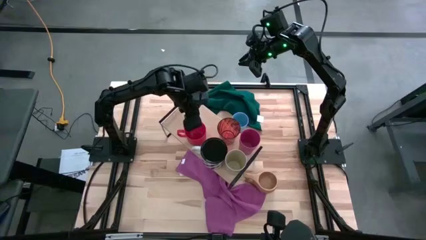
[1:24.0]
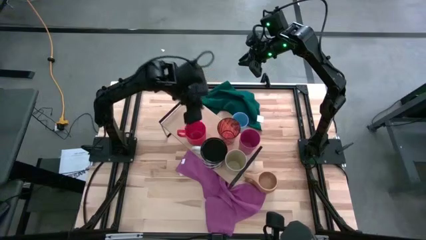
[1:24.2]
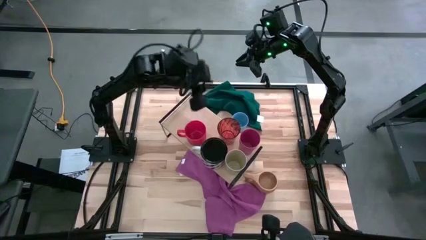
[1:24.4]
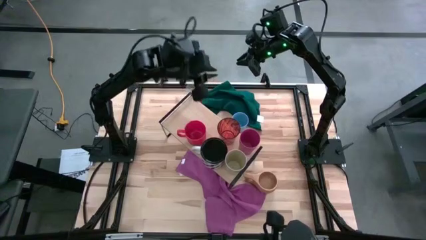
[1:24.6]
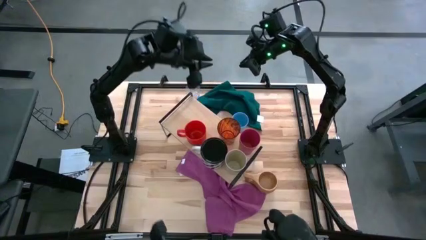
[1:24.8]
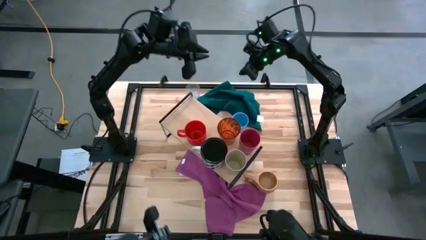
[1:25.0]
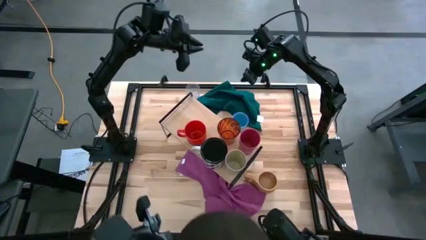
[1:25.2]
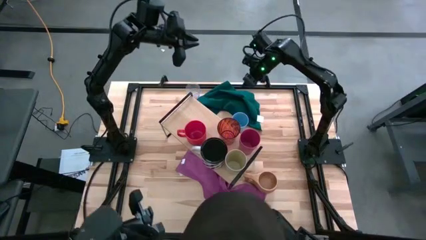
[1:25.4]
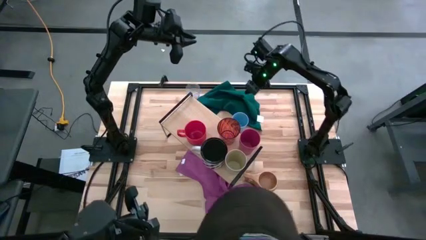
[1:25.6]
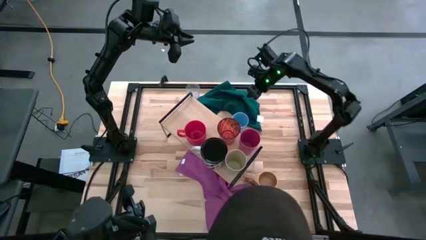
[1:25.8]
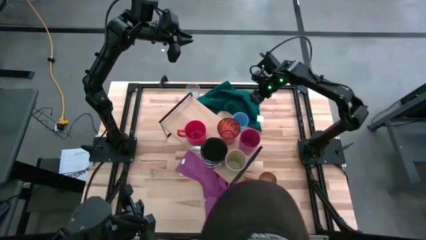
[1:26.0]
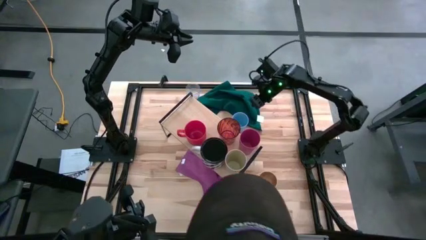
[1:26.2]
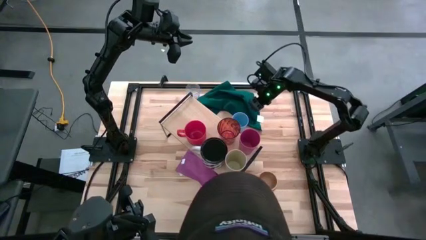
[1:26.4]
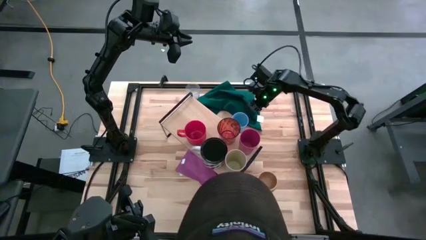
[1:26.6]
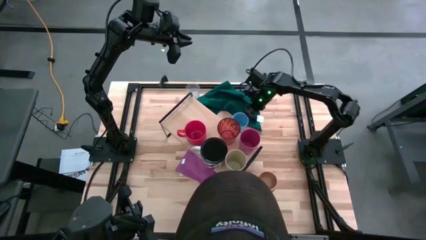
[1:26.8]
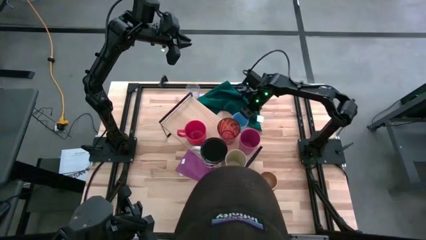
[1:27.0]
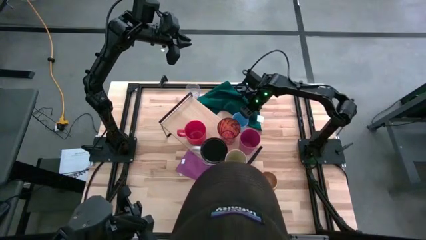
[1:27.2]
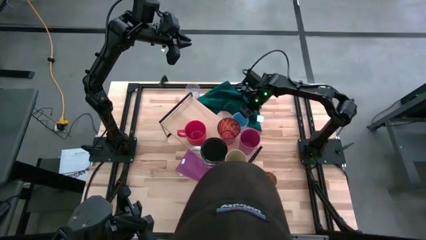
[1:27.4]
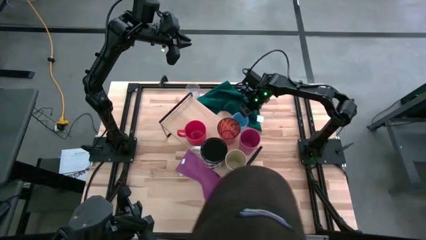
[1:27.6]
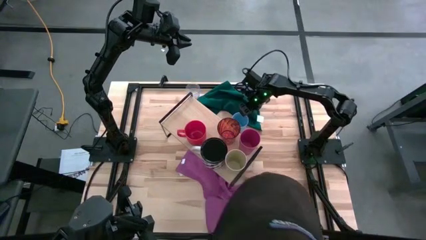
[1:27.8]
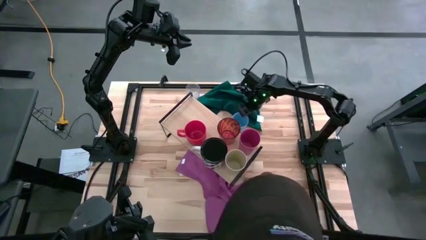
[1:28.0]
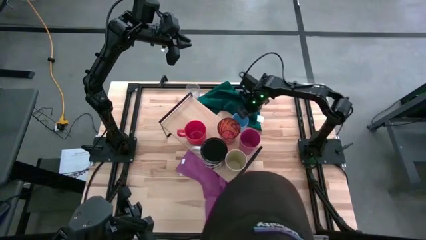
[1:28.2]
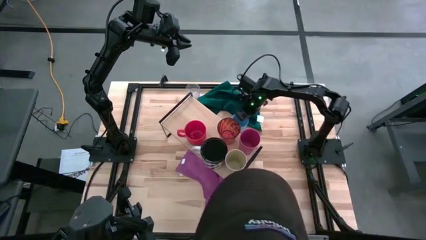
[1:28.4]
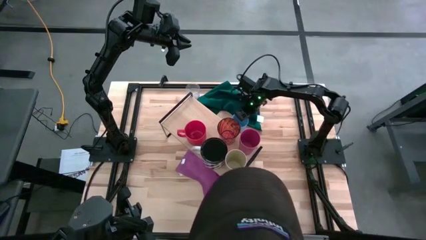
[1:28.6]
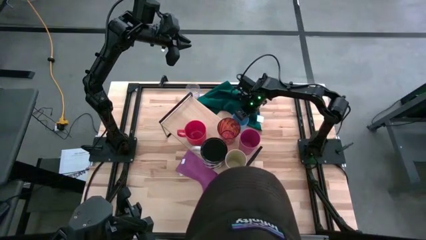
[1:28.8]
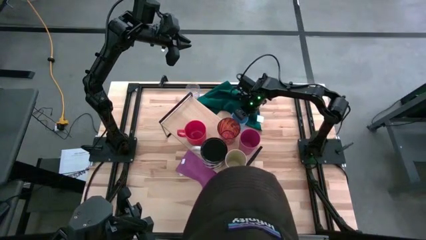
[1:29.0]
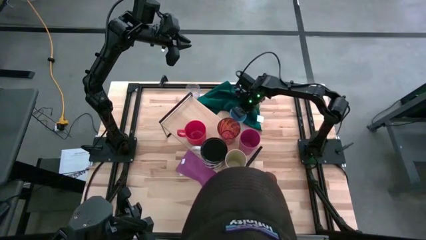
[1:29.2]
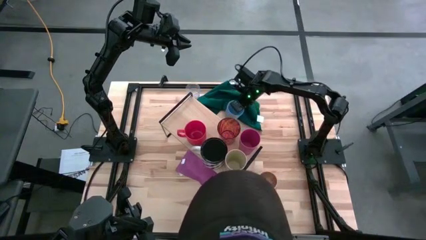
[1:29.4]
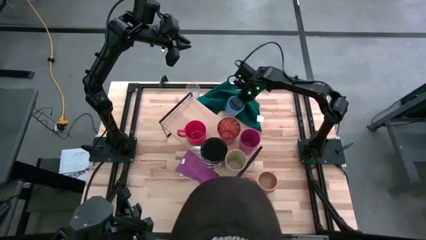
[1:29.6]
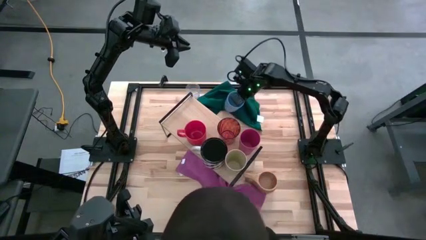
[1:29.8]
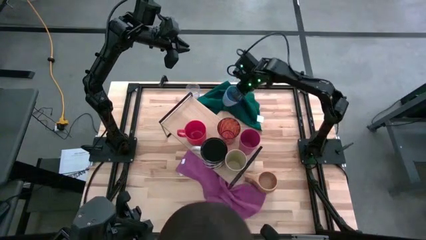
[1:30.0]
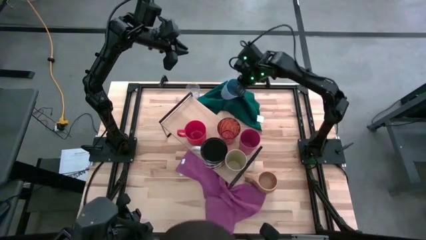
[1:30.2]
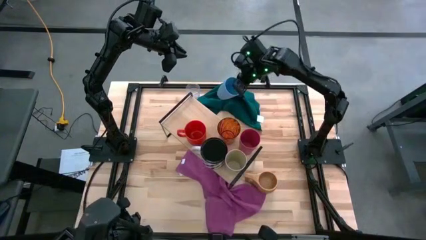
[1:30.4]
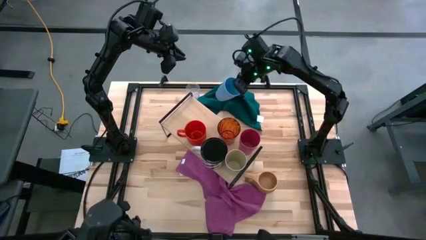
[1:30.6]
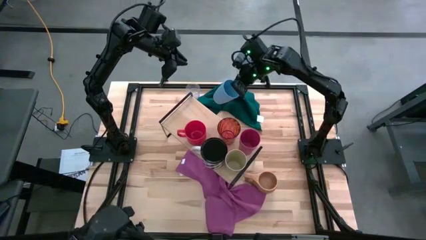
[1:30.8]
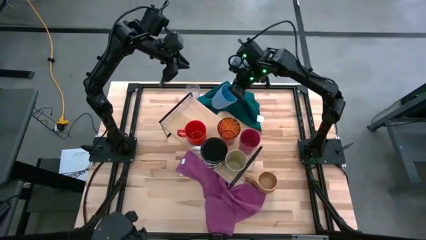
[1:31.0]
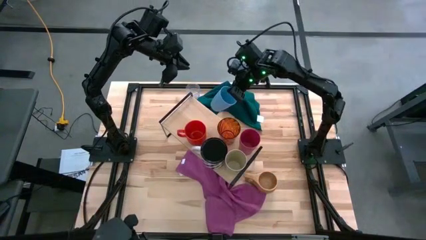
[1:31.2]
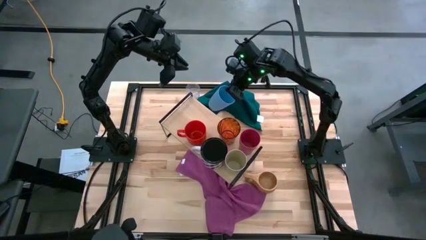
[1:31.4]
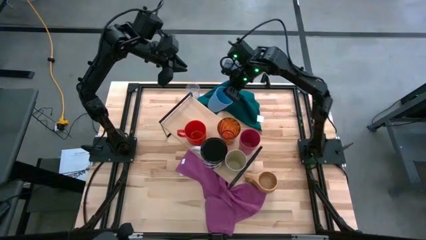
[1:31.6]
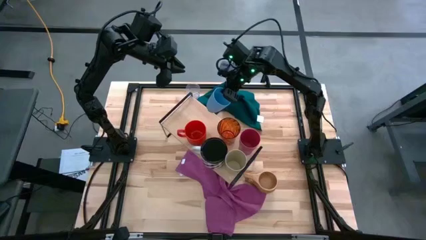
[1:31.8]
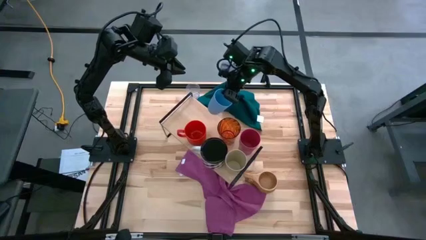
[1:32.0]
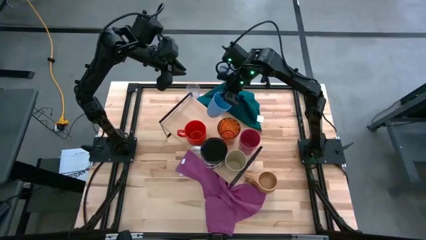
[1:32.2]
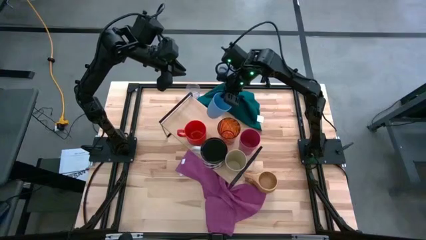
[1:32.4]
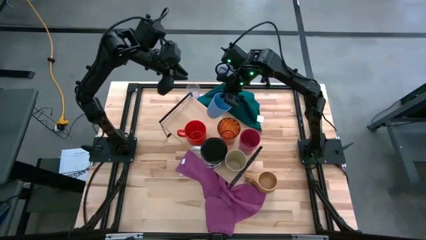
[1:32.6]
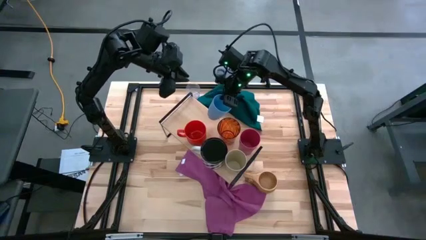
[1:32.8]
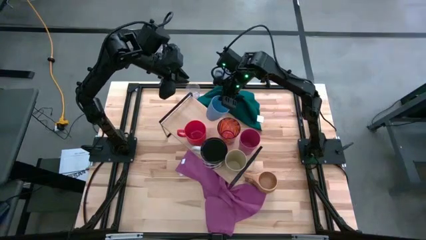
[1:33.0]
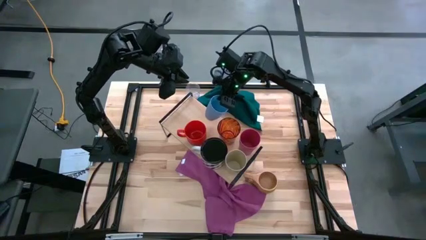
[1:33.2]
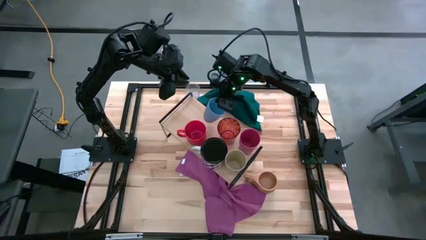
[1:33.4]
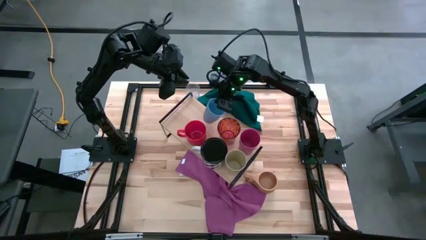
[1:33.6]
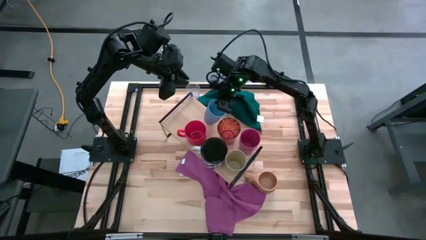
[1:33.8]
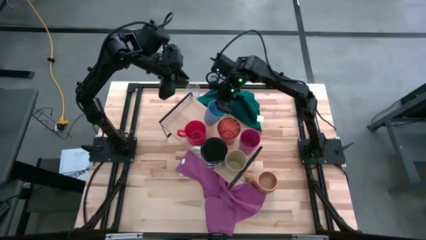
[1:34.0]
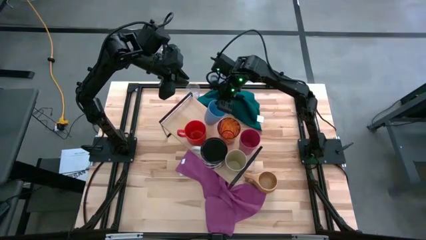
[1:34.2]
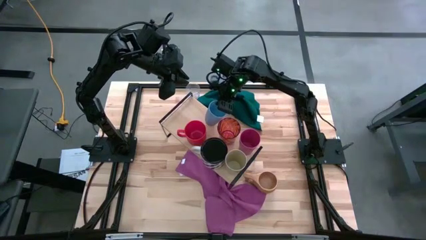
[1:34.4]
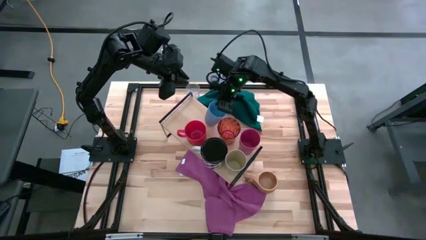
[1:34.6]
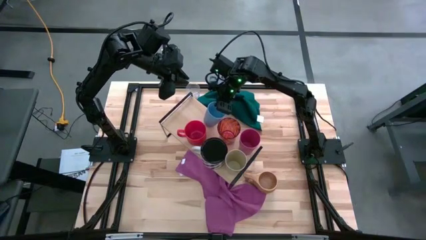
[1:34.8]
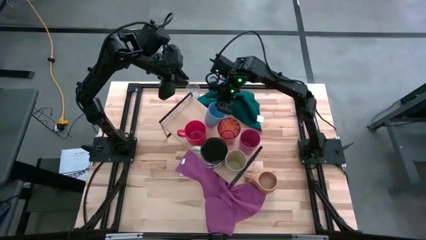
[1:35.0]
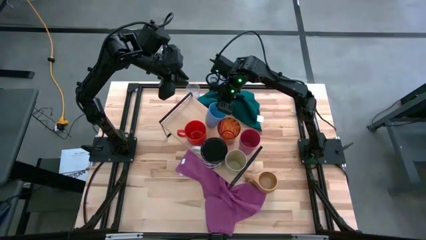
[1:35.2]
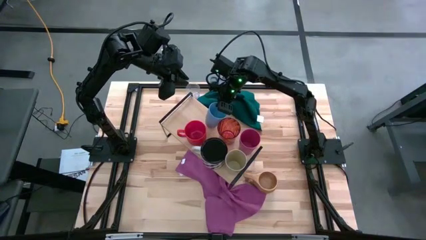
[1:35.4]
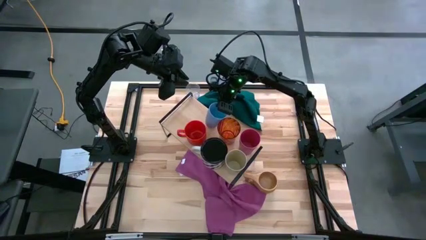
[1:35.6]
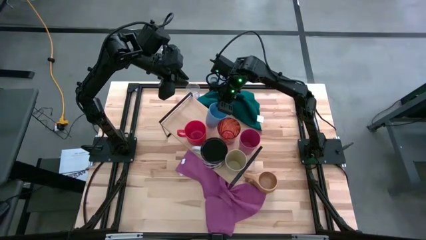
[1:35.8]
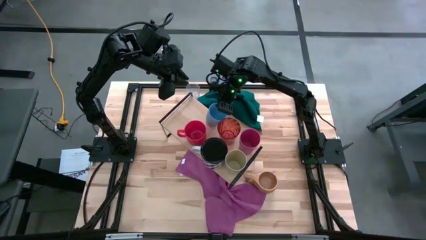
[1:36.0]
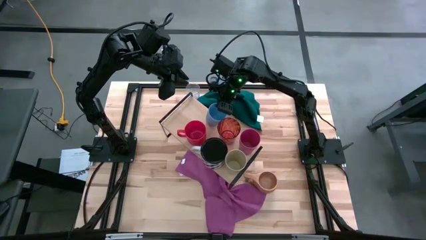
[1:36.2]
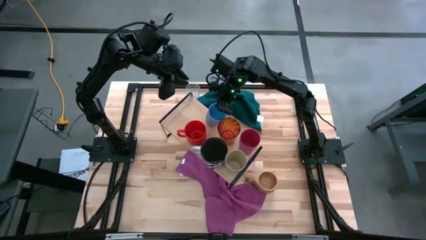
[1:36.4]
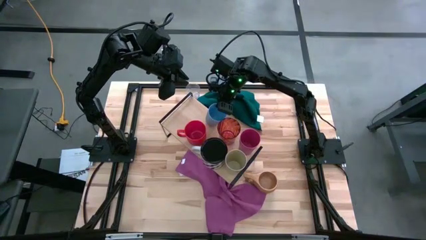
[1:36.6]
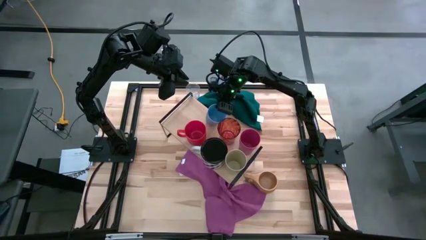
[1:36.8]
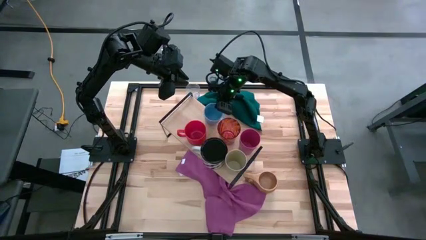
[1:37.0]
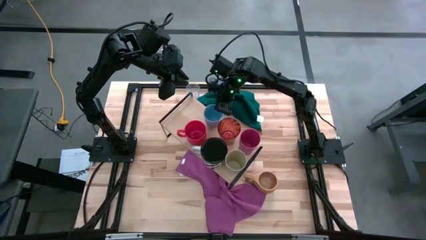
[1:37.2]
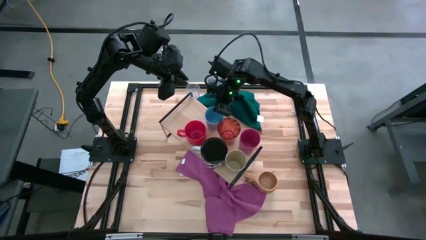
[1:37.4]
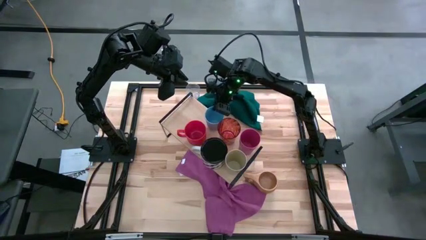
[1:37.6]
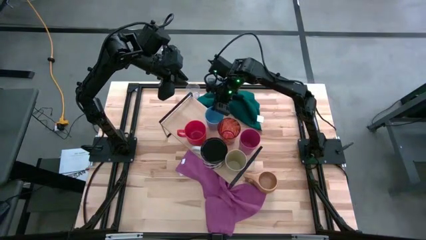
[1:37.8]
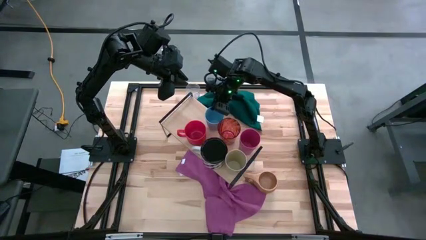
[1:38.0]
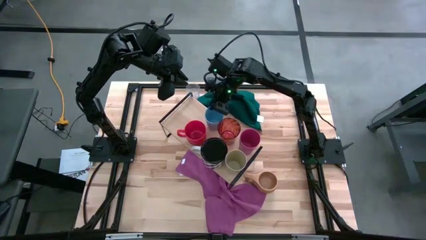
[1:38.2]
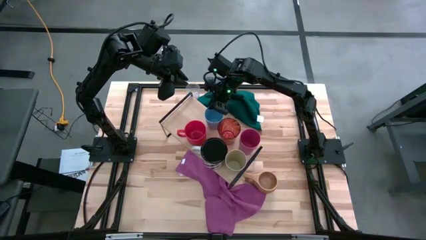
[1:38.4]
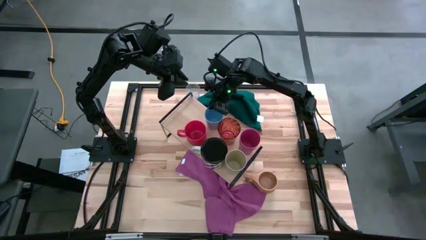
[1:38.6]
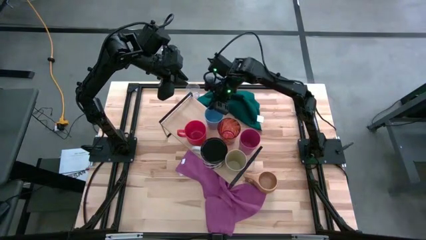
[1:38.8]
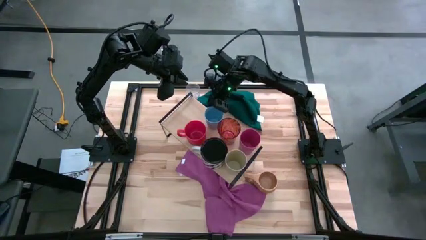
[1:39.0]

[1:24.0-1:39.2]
Task: Stack small to large cups/mugs on shelf
Put the blue mug on the shelf

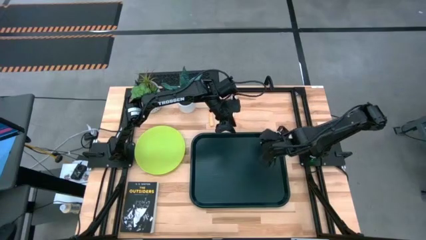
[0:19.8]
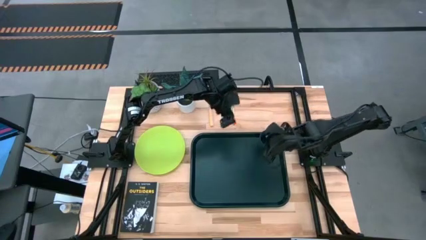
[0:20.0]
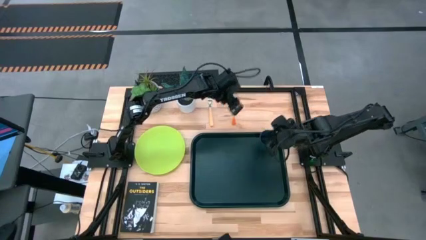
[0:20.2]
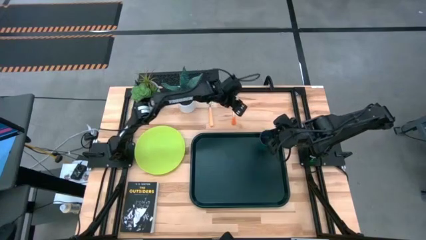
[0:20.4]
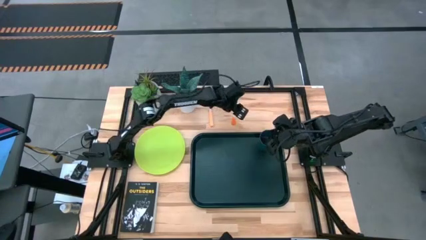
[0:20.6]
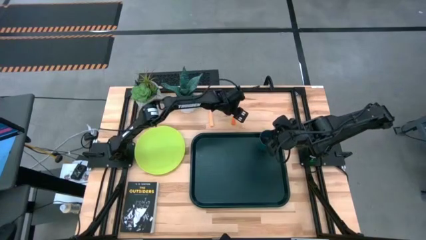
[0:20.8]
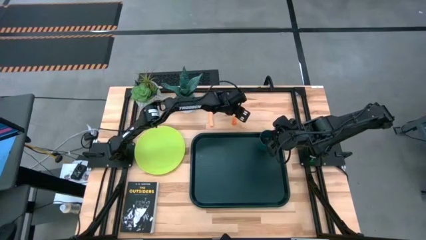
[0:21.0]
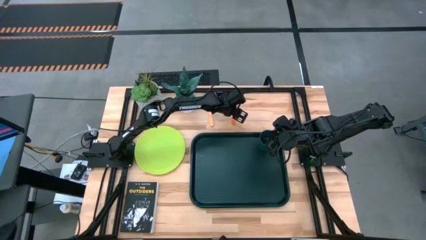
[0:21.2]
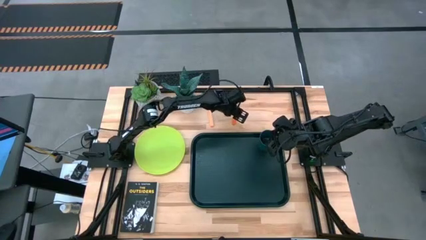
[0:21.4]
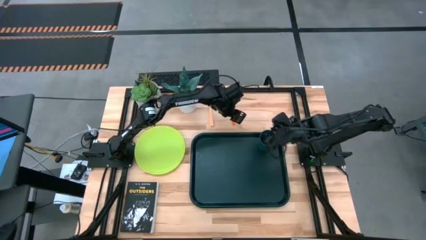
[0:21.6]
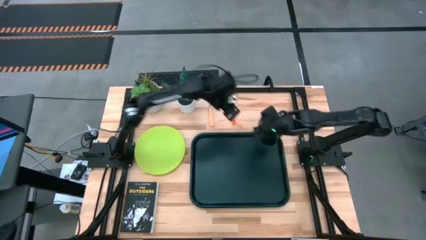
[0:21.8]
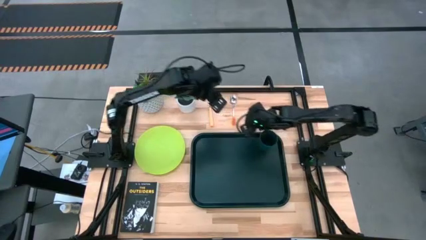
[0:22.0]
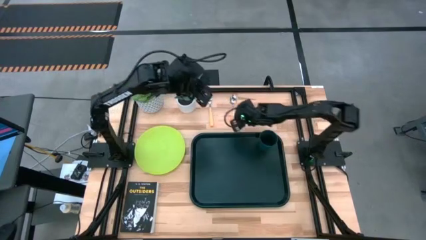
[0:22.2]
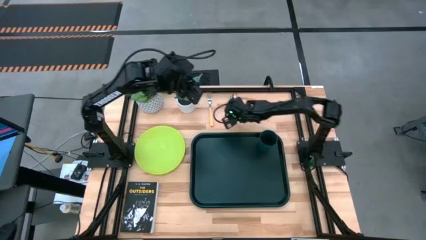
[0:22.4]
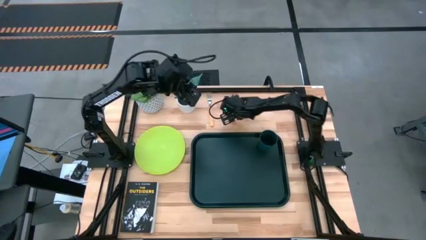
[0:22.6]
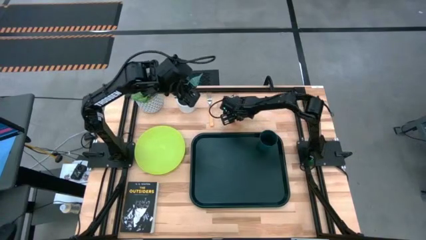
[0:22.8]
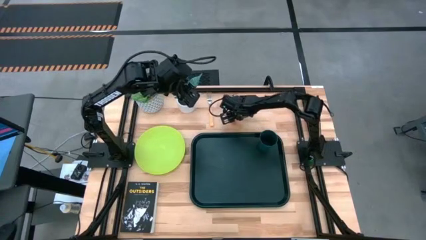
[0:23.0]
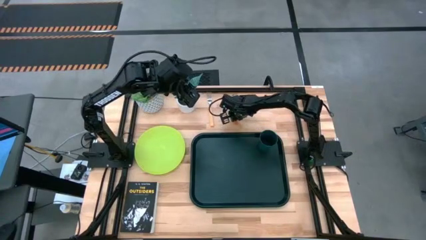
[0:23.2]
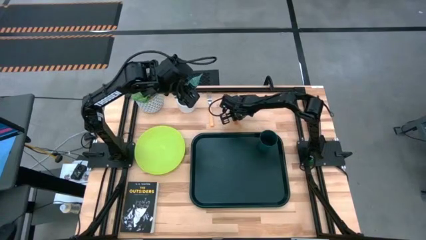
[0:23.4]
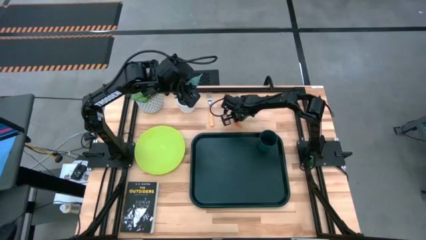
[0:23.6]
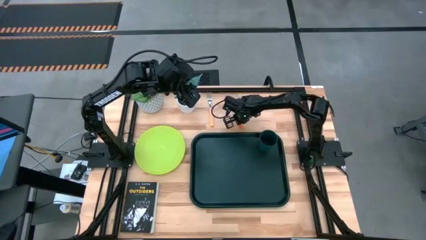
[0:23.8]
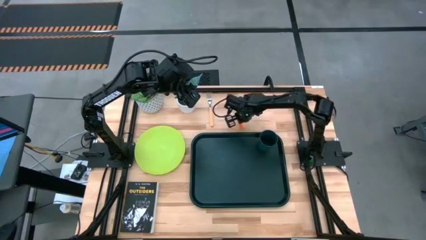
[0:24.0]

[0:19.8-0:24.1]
Task: Pick and place plate/cup/fork/spoon on tray
Put the orange-white spoon on the left side of the black tray
